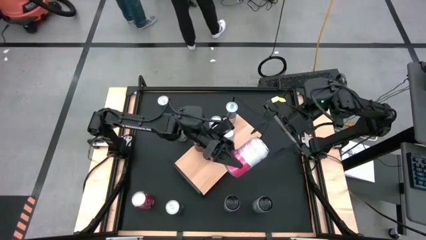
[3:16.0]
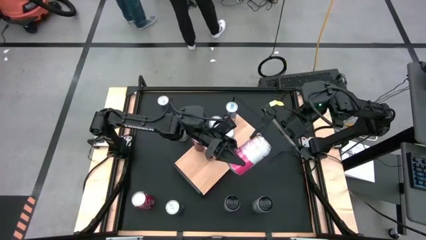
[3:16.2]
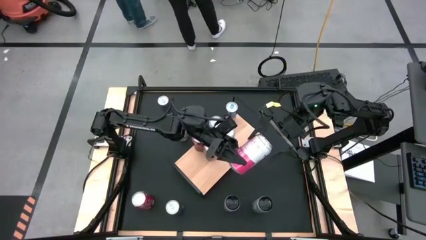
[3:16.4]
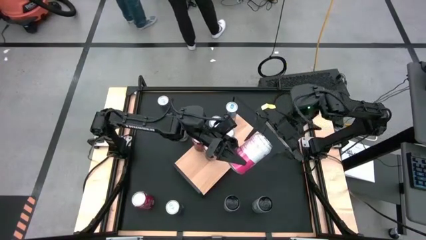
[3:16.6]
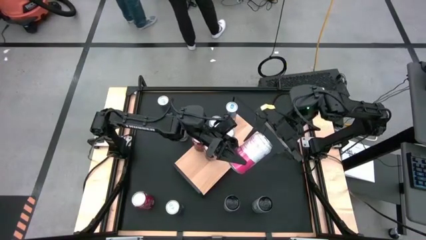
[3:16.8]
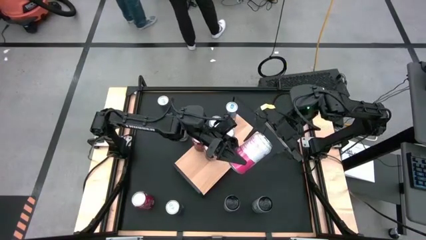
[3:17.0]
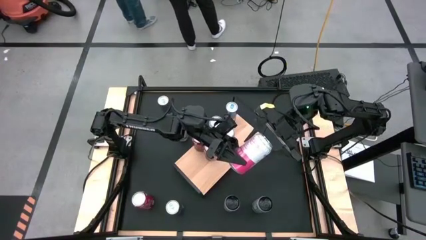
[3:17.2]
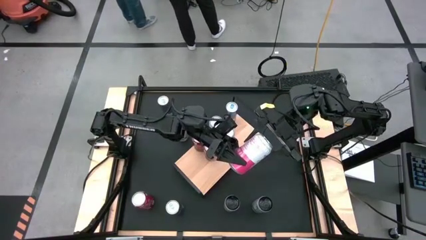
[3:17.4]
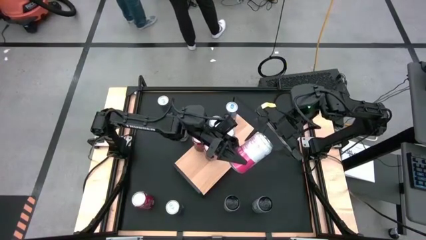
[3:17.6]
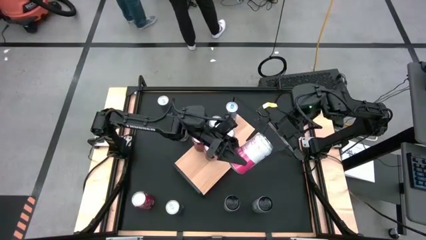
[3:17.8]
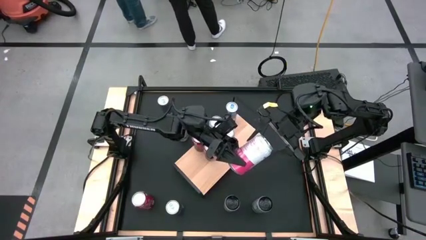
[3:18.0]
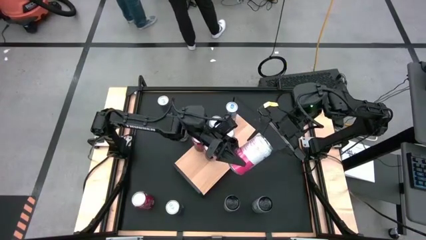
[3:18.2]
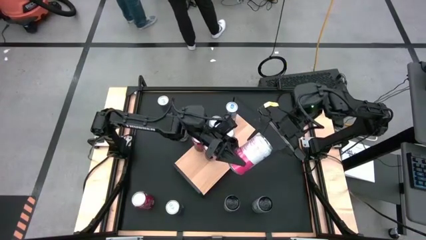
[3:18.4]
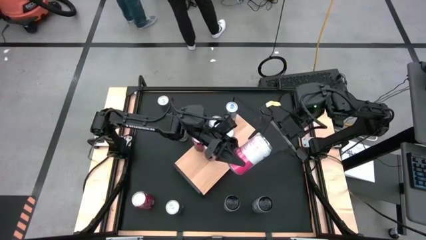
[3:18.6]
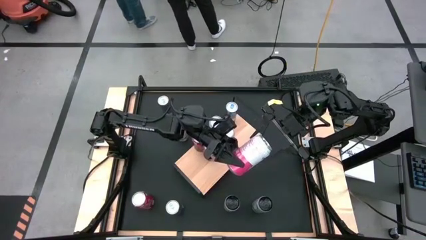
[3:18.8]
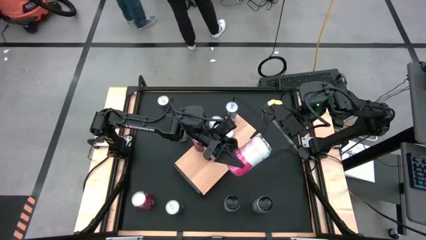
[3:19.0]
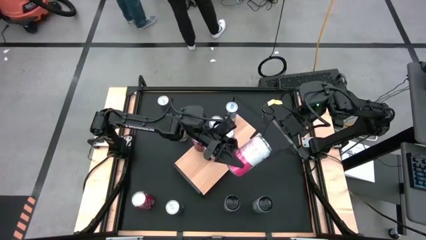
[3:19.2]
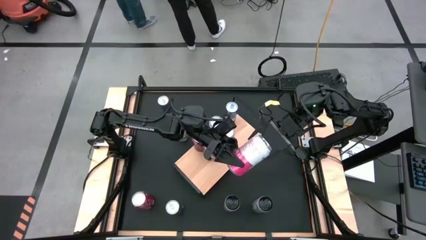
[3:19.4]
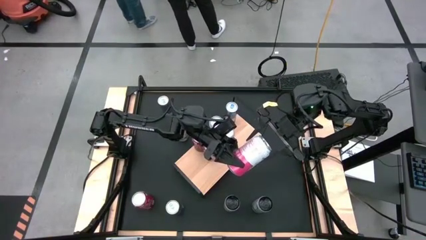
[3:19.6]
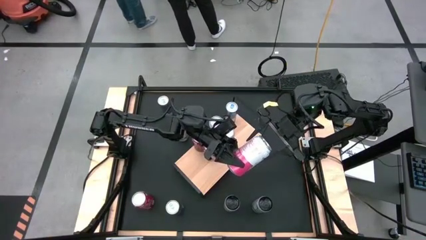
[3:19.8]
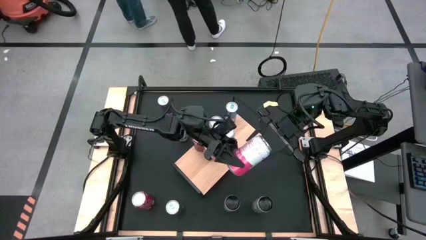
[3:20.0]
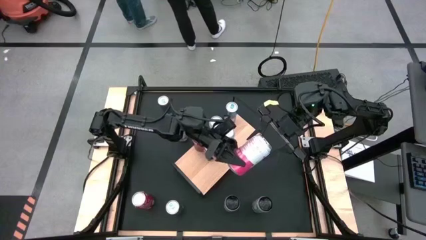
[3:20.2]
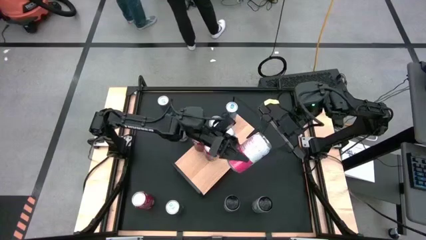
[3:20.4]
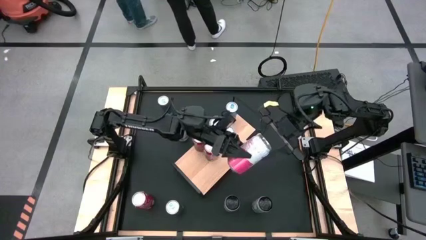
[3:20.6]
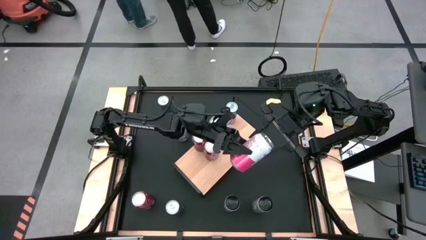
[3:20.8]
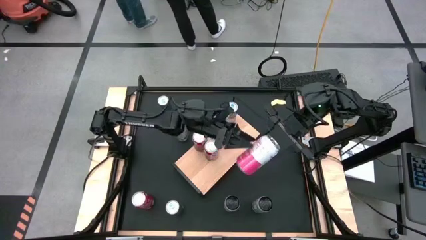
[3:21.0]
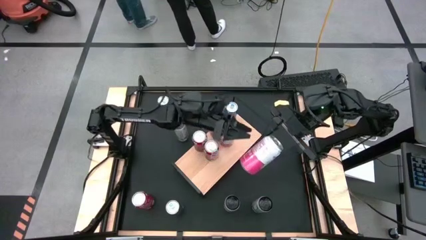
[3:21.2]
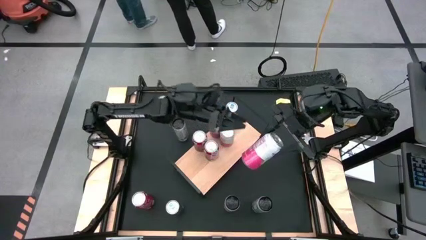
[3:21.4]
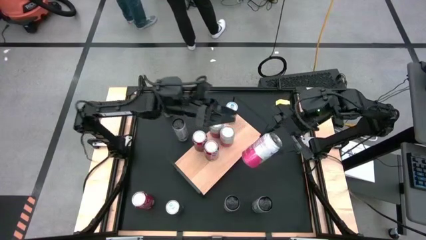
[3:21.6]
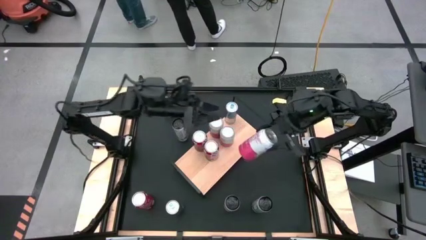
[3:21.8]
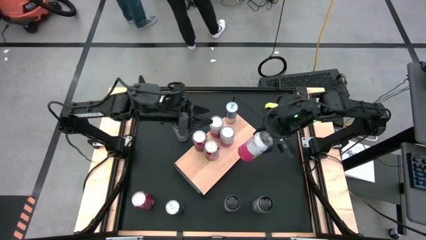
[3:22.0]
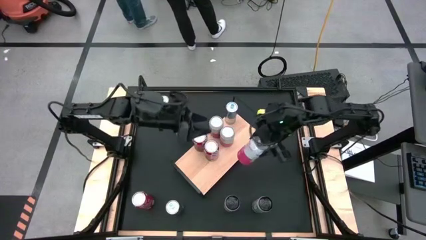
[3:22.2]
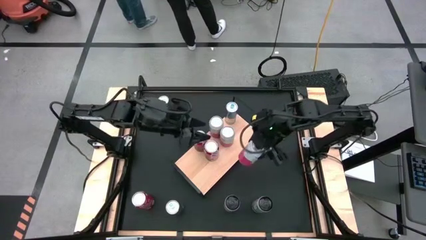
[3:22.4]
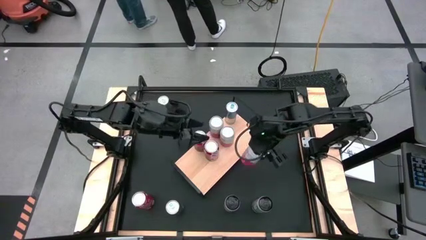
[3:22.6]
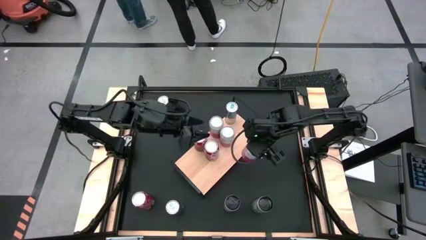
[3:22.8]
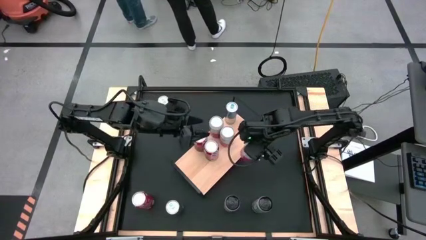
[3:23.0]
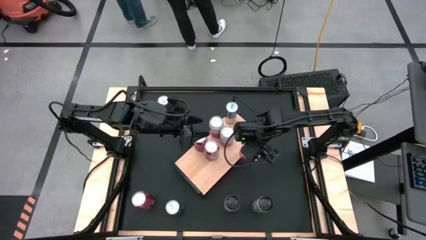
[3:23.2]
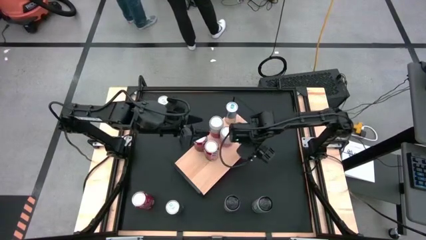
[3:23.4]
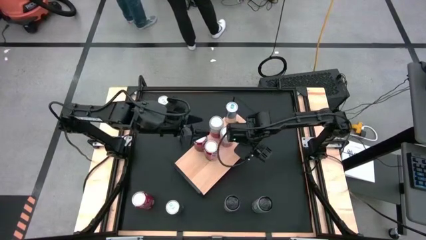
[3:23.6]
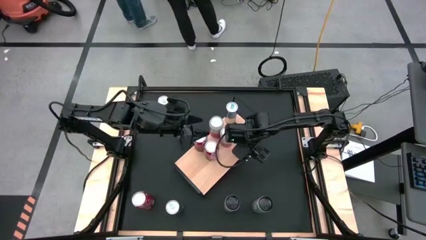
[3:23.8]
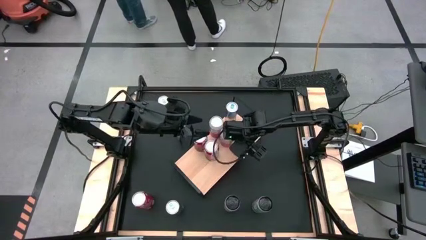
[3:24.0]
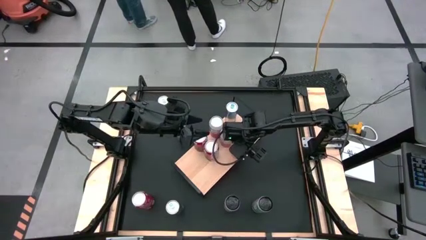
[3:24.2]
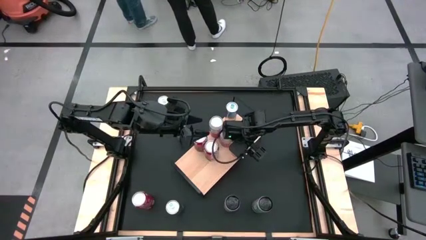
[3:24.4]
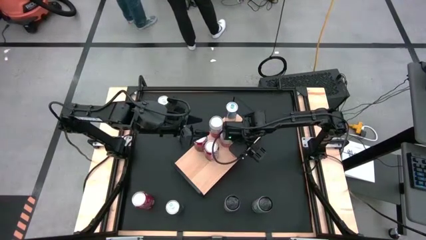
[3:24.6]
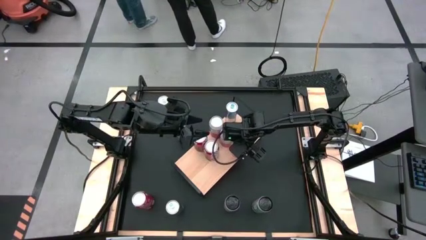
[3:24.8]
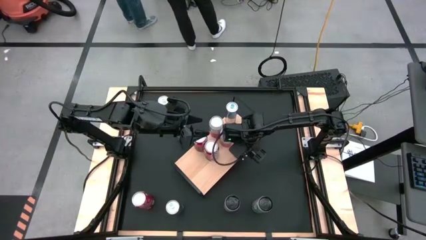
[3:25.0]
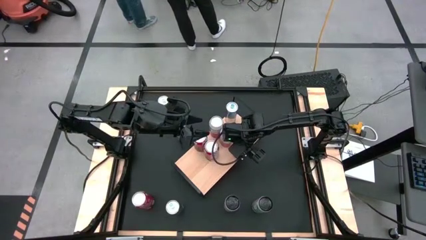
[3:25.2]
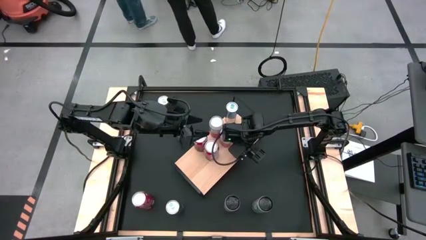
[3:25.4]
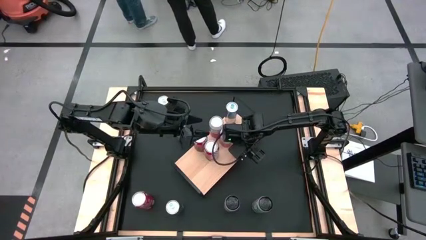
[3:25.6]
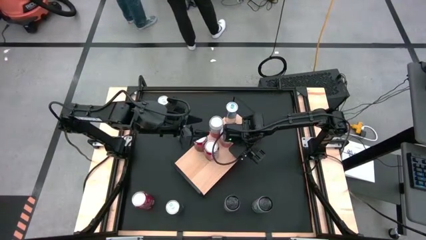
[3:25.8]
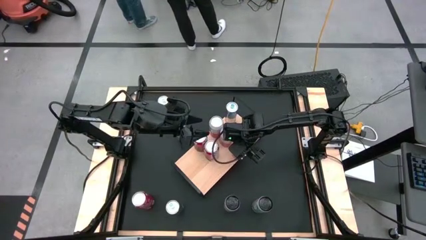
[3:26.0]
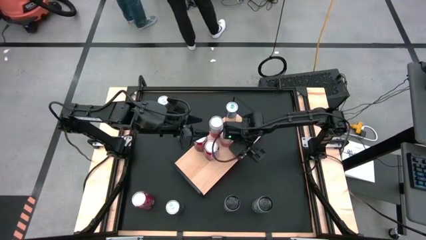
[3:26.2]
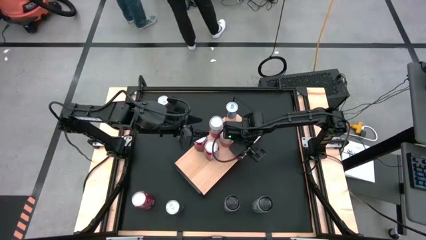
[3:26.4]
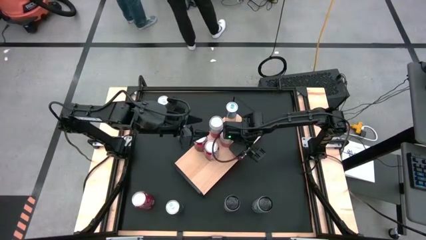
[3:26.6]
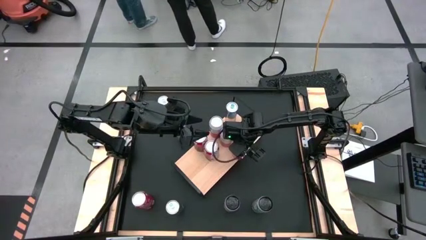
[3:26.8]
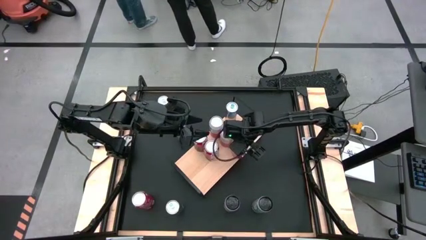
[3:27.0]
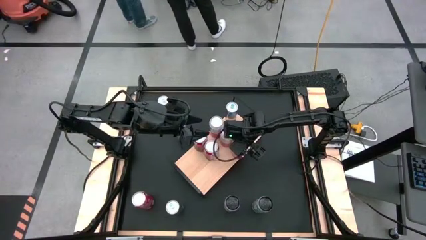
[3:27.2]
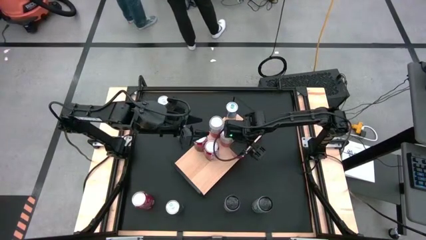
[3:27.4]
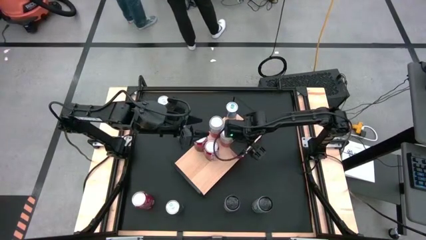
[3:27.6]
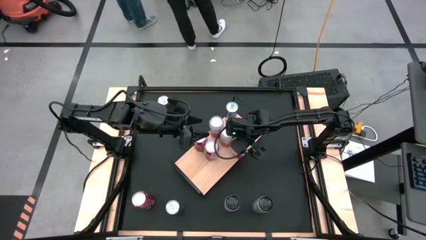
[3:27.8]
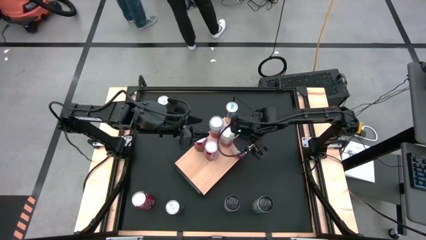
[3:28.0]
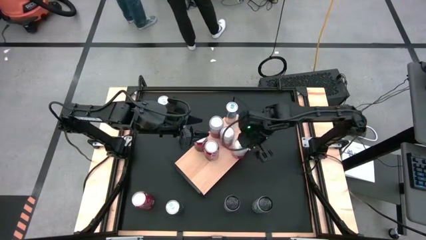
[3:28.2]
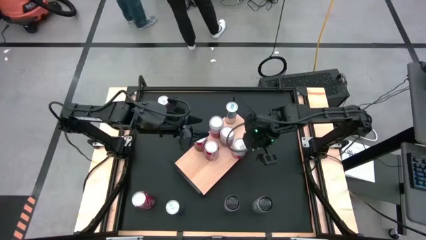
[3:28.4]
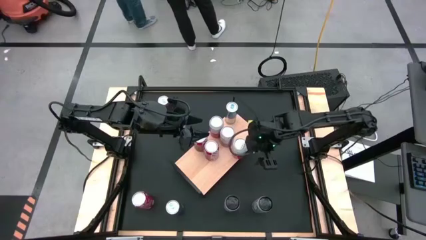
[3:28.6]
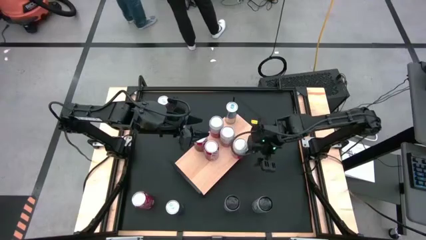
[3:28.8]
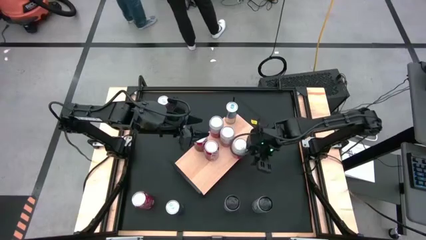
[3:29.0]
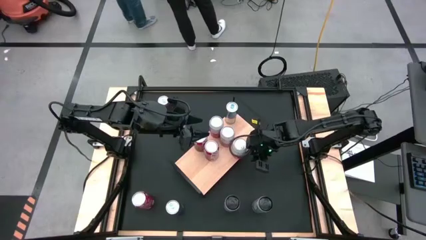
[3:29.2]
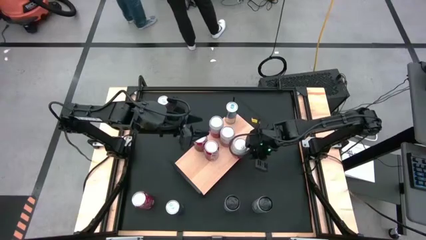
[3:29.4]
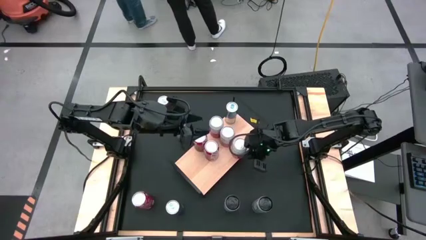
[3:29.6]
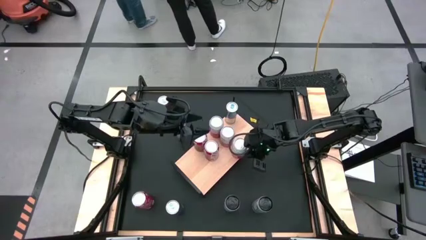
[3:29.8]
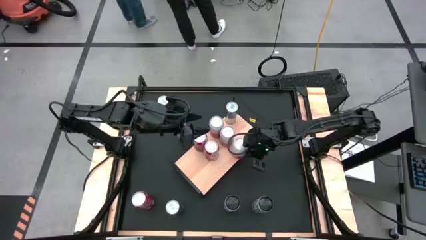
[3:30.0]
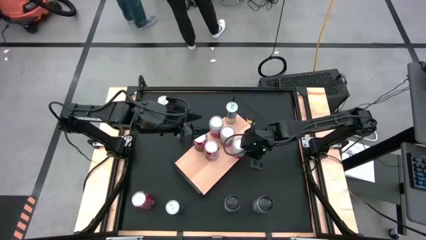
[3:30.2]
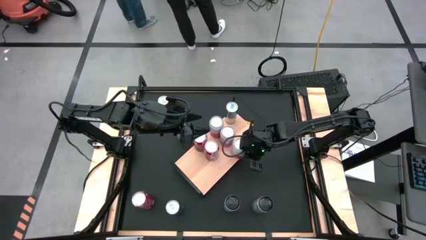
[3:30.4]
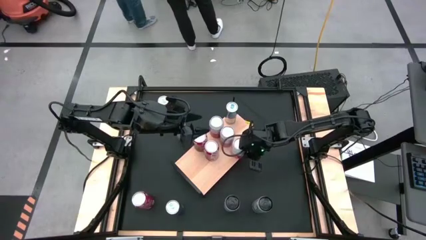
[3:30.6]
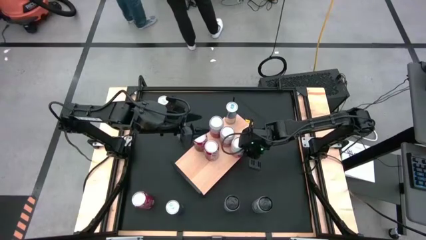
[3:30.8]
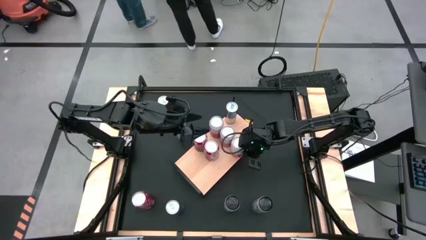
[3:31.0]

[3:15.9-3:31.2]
Task: Place canned beverage on shelf
Put the pink white soda can on the shelf aligned with the other pink white soda cans
